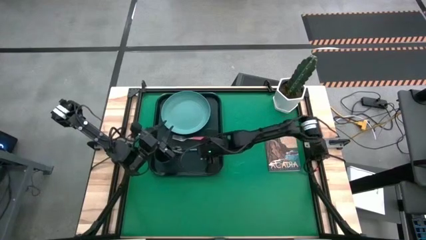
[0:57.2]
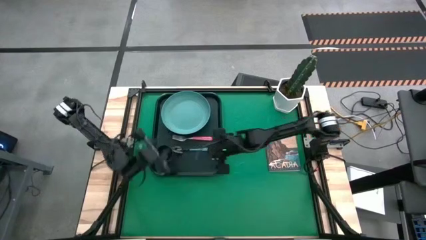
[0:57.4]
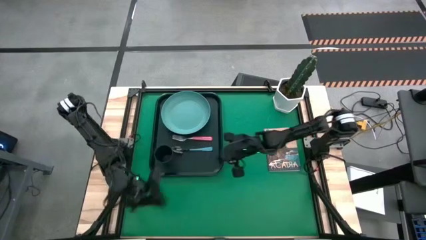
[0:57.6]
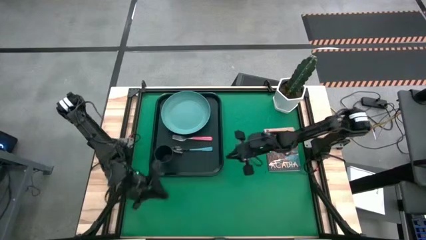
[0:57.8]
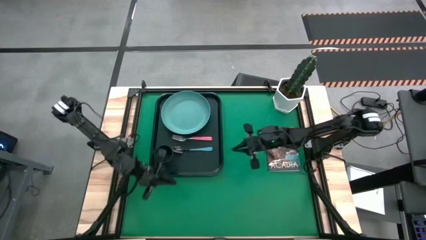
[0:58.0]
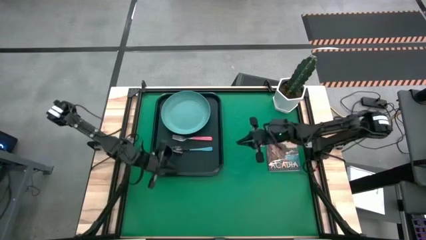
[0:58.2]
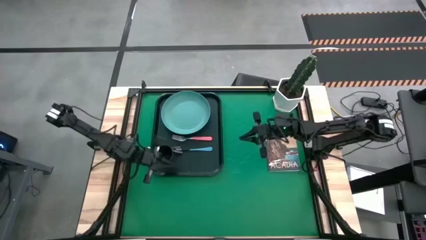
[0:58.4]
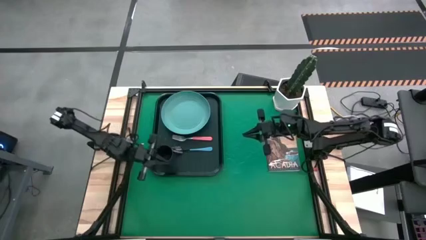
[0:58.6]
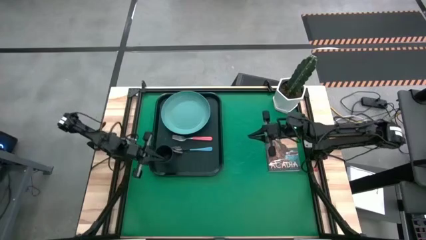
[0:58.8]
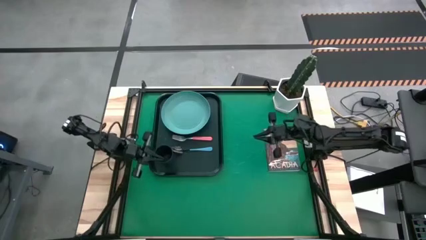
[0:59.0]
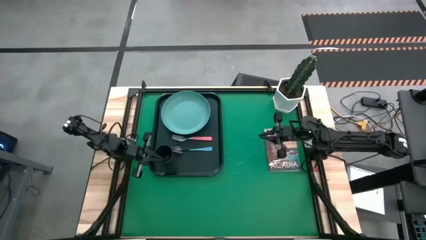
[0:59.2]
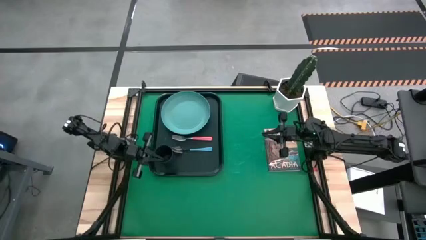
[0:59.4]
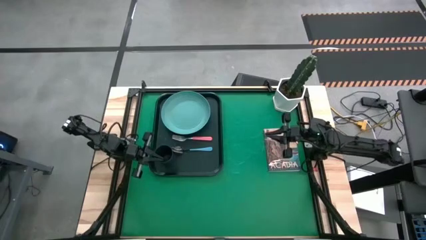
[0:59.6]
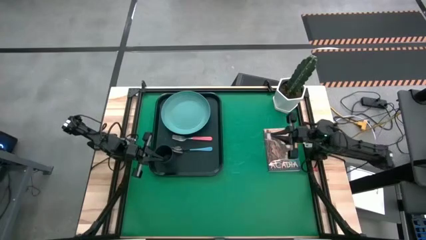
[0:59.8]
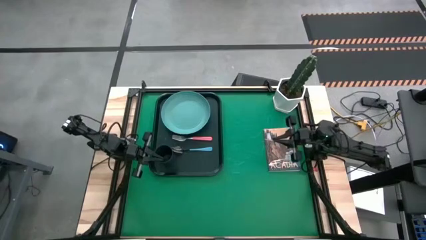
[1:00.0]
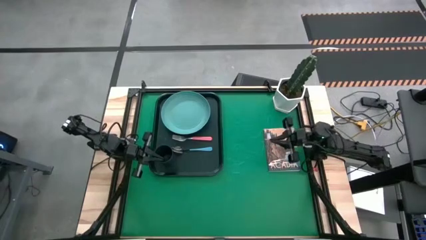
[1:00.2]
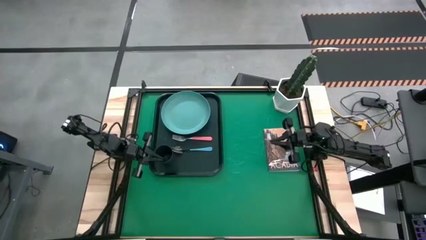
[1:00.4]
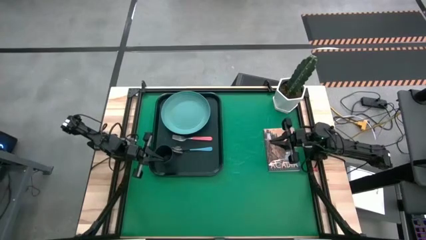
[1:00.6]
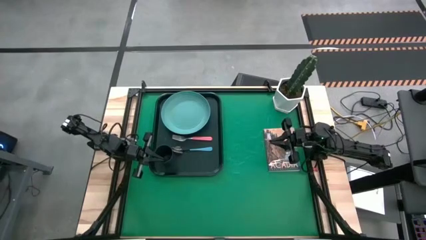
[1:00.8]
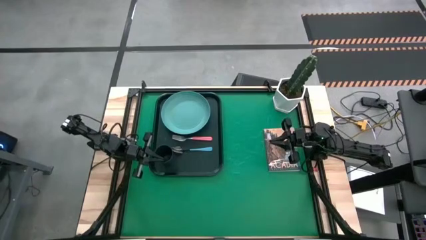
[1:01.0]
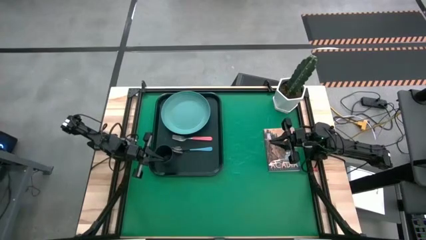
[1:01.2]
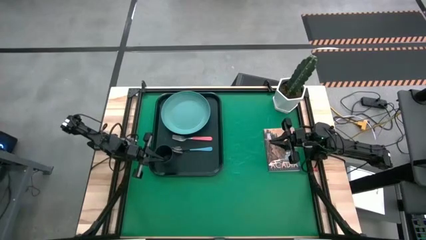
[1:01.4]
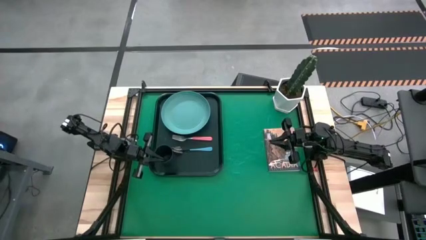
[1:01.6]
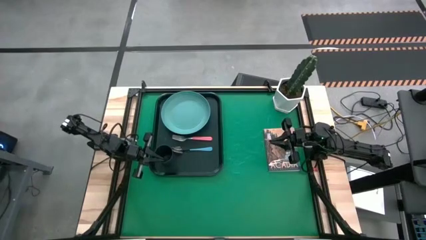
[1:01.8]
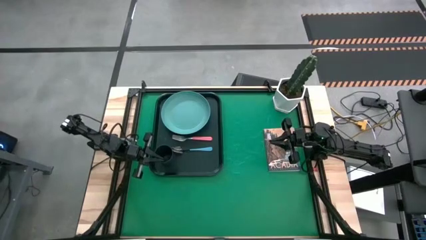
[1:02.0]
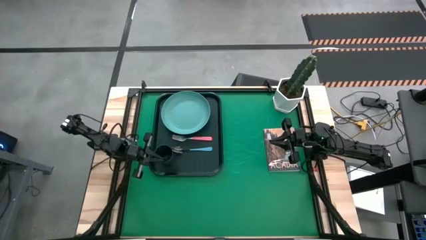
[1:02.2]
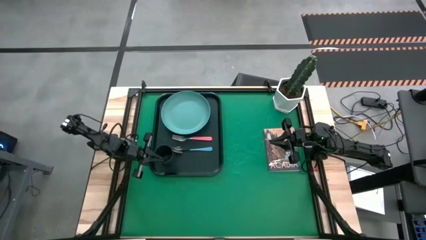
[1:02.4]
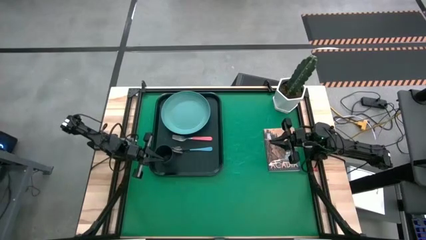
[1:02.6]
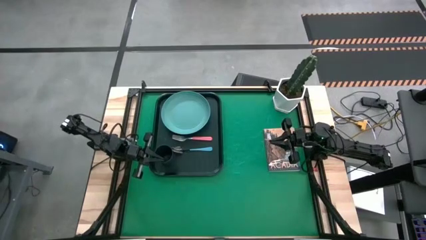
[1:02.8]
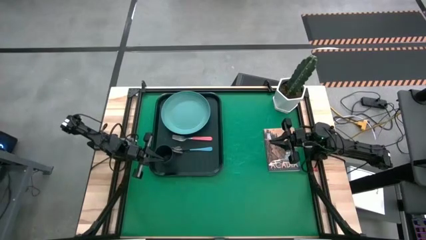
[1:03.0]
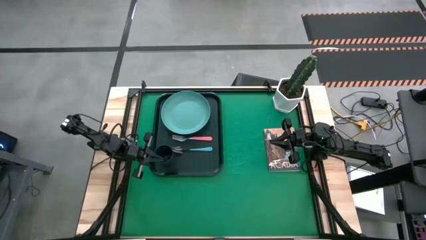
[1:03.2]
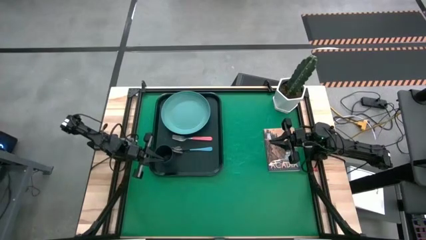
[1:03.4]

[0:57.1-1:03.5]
Task: Pick and place plate/cup/fork/spoon on tray
Return to Home Position
